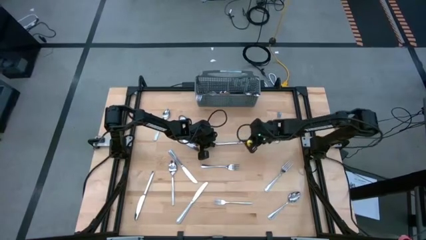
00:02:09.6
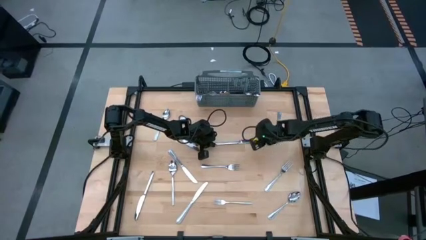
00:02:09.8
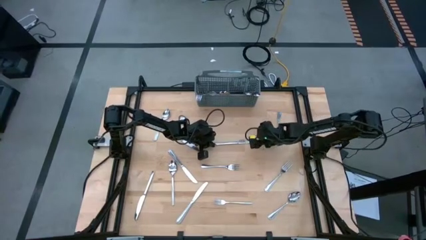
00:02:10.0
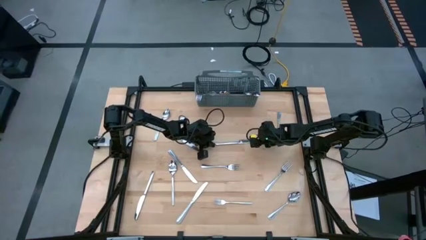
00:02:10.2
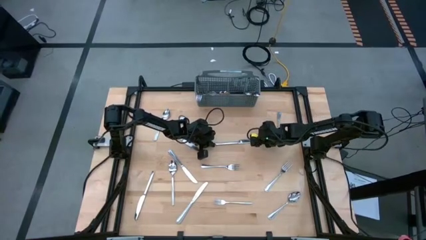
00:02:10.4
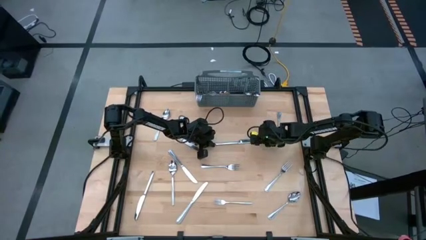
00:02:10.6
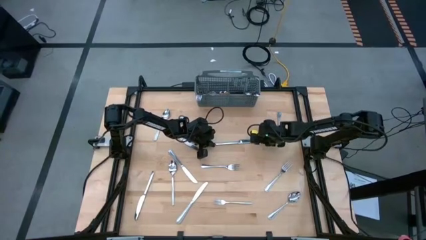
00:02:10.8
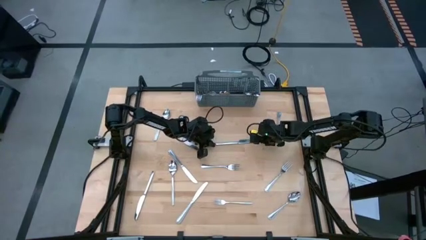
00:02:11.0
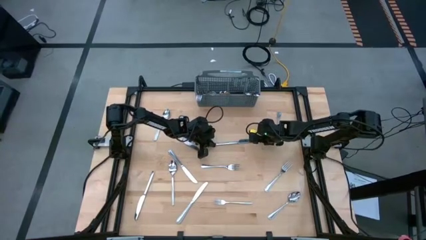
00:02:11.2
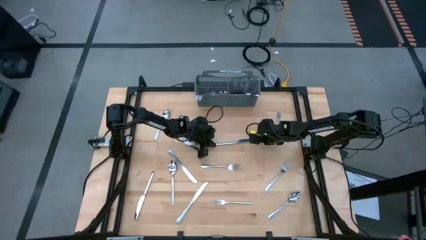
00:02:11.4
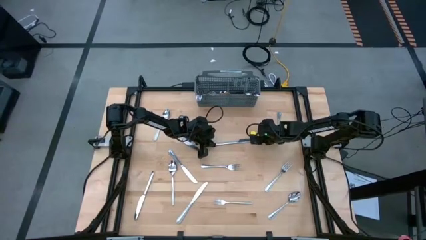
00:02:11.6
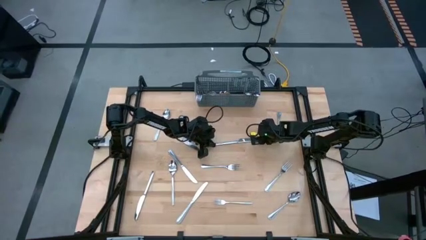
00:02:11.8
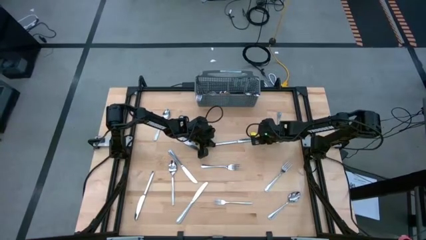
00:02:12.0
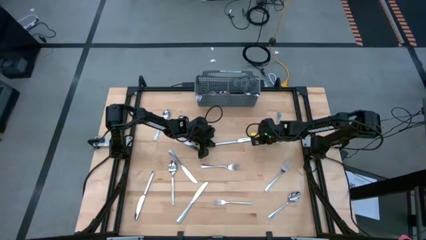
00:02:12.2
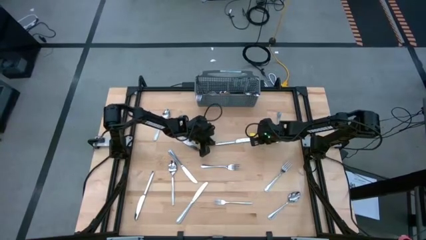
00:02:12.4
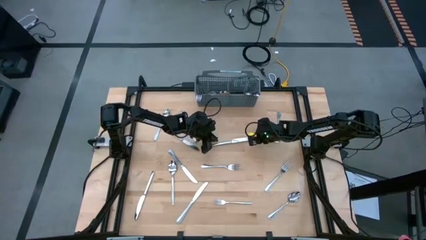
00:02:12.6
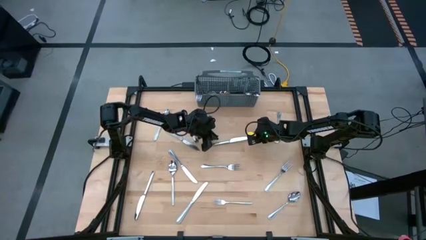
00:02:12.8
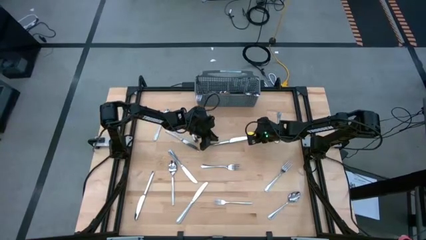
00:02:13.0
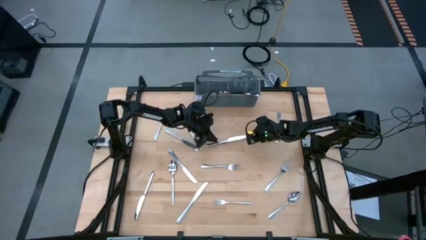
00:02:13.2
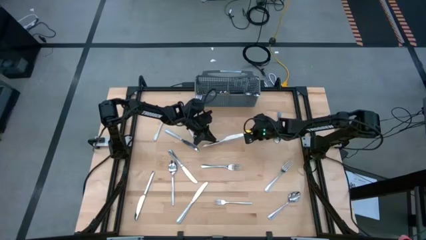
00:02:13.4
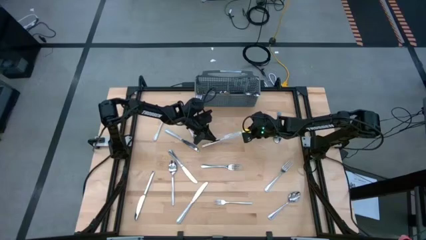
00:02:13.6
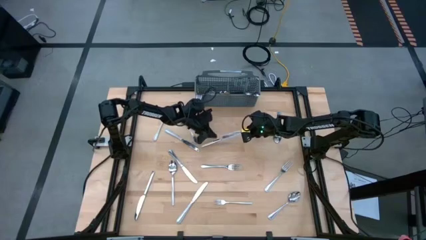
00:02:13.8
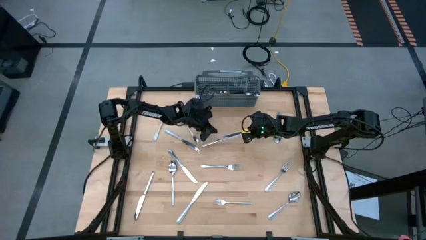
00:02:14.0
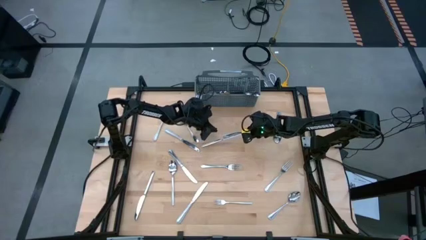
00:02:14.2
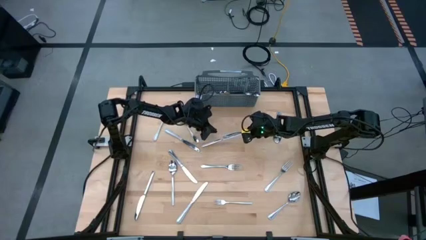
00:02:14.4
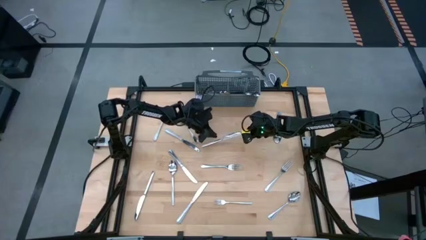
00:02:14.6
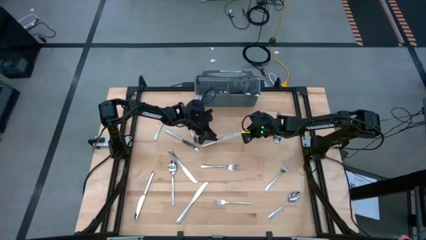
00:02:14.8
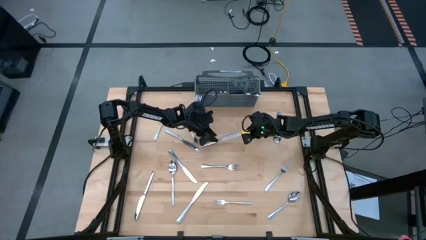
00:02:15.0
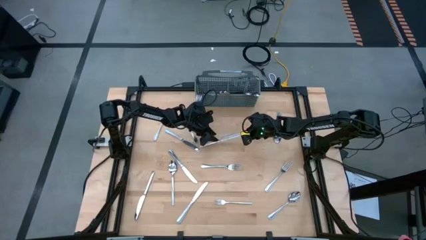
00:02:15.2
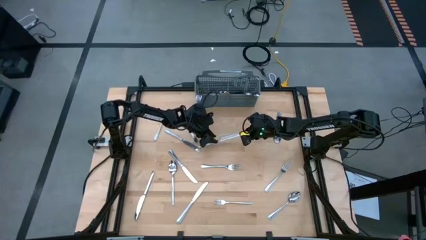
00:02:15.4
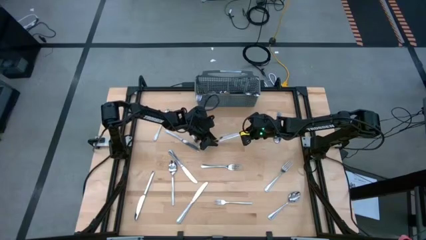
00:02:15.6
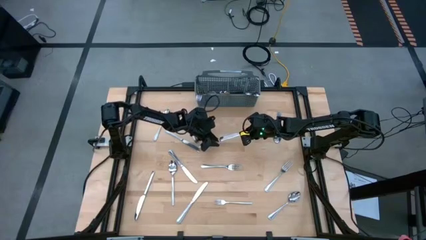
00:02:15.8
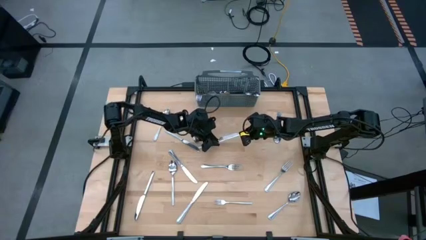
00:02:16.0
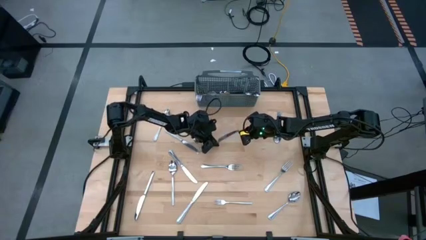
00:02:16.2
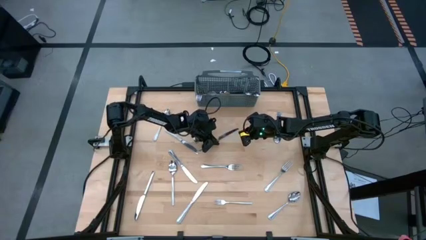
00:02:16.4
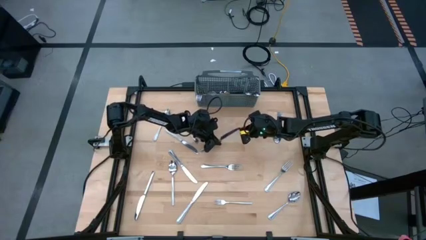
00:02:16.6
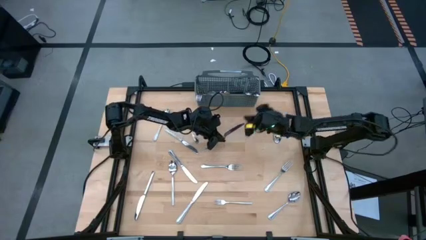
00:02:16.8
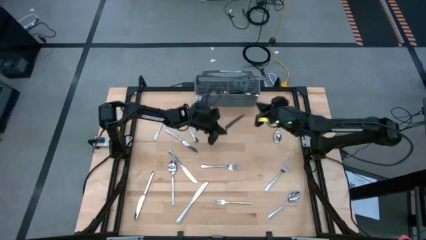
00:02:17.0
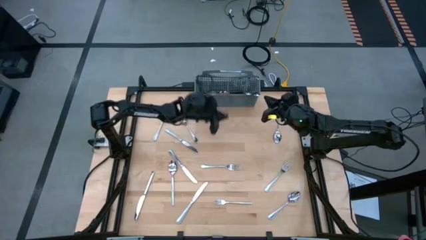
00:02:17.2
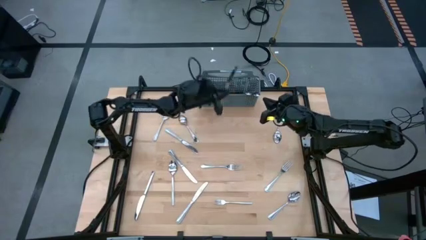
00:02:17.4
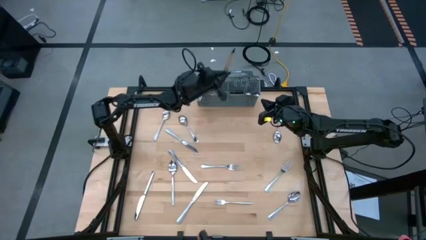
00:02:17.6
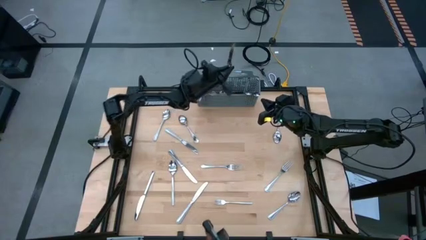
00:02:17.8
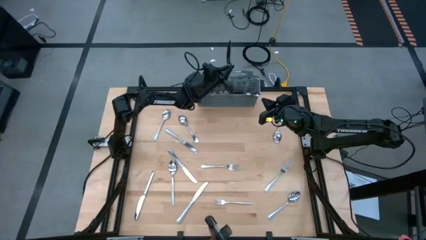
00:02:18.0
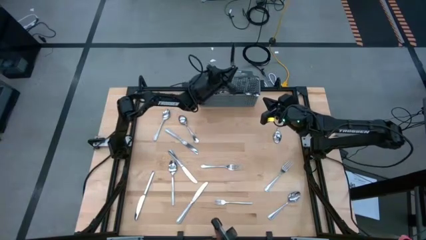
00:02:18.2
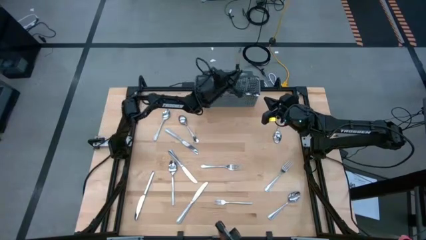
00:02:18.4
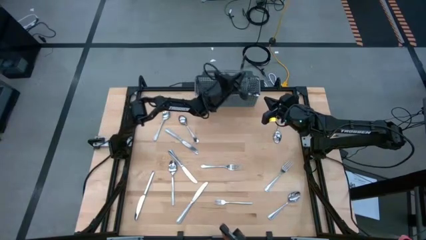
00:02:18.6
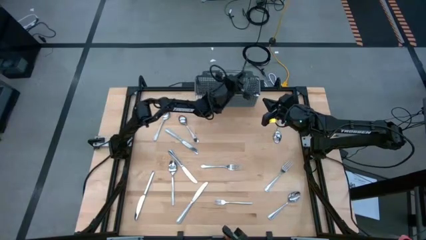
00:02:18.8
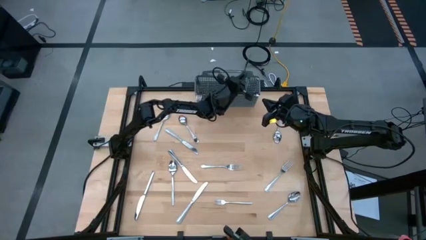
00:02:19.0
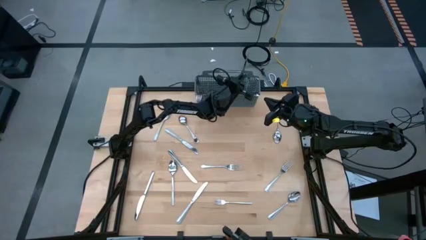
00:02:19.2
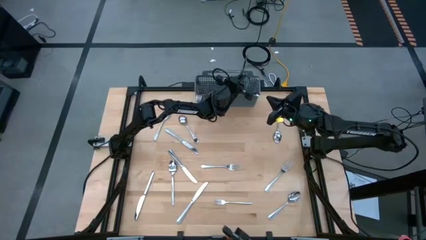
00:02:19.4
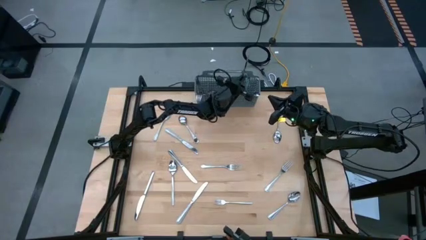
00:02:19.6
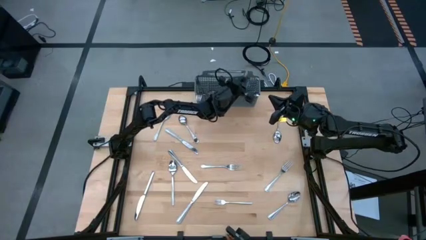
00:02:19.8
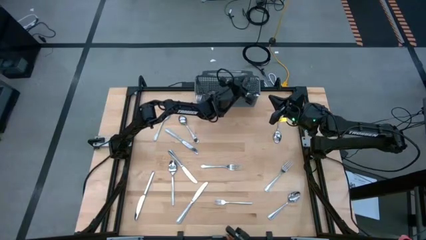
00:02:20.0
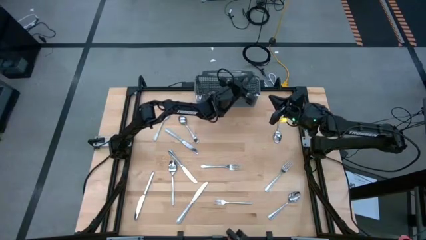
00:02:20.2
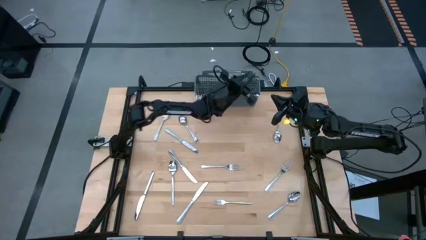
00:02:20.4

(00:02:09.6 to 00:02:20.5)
Task: Sort silverware
Put the silver table knife into the silverware organizer

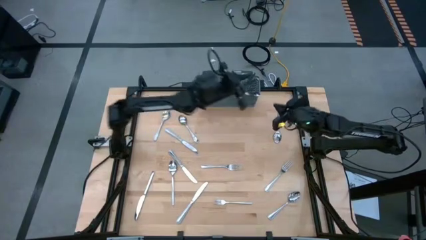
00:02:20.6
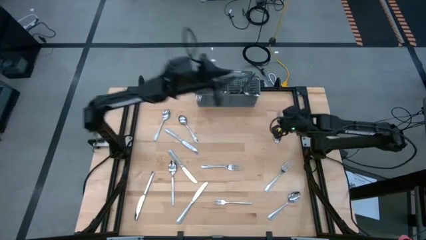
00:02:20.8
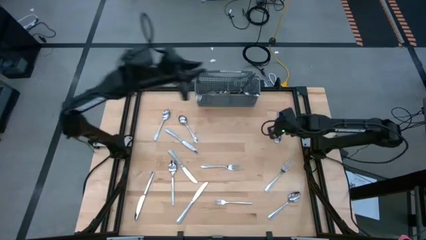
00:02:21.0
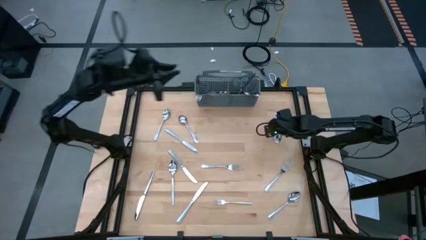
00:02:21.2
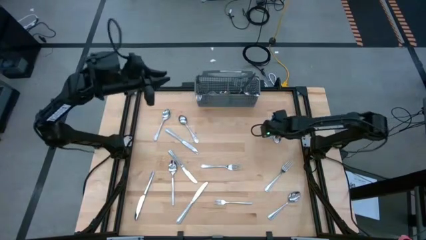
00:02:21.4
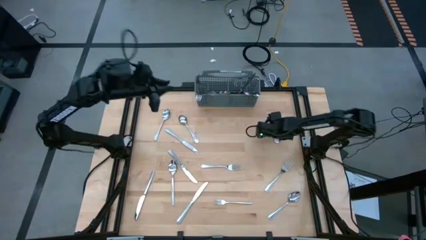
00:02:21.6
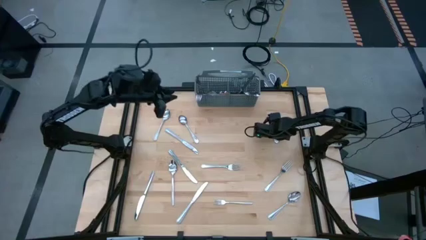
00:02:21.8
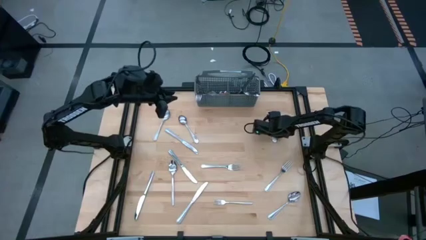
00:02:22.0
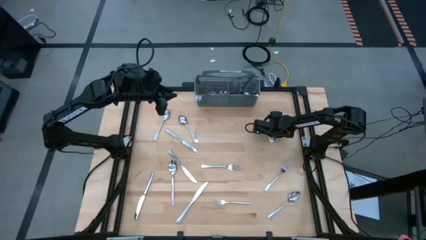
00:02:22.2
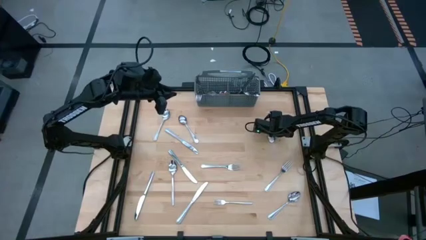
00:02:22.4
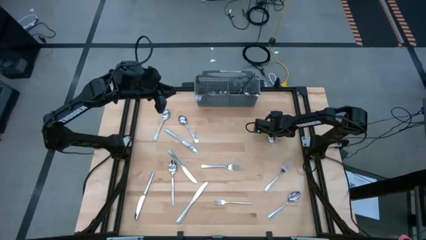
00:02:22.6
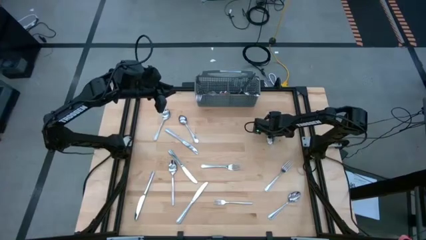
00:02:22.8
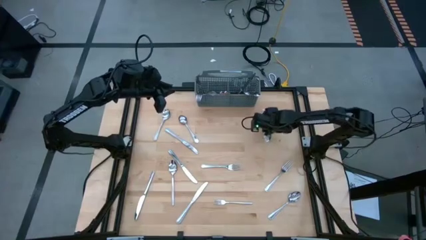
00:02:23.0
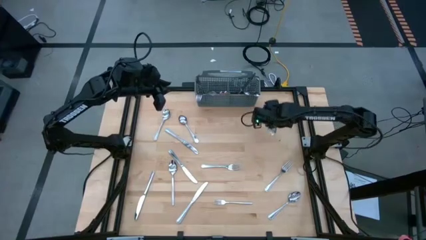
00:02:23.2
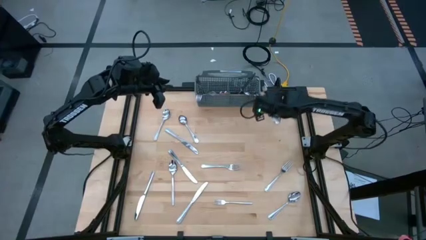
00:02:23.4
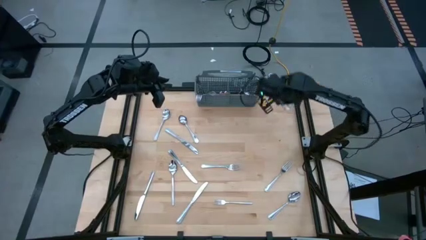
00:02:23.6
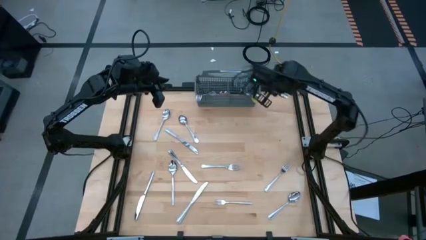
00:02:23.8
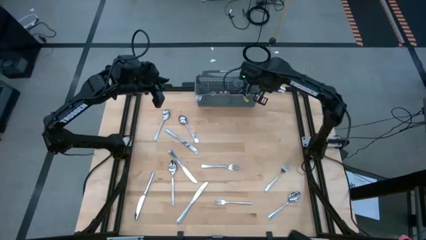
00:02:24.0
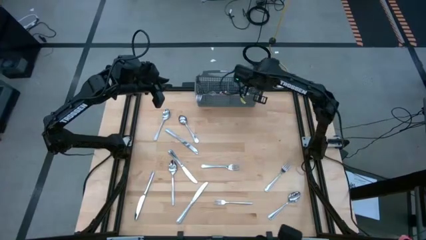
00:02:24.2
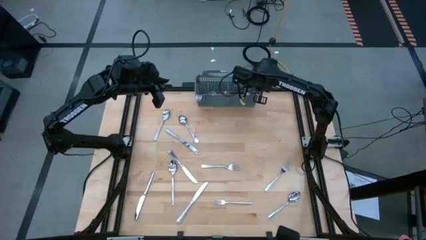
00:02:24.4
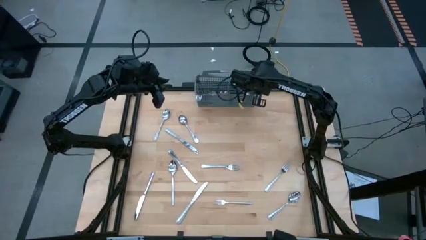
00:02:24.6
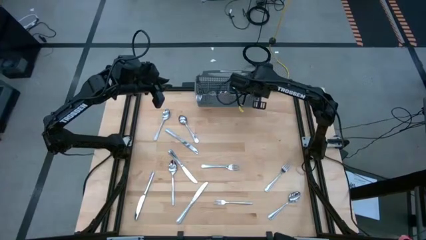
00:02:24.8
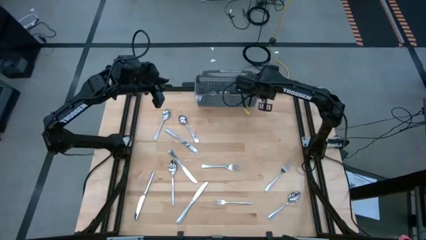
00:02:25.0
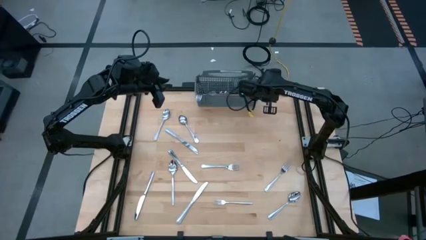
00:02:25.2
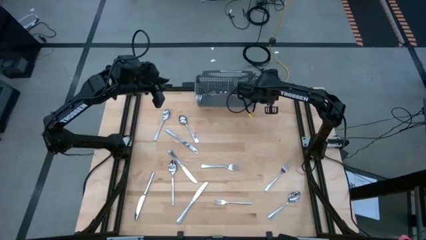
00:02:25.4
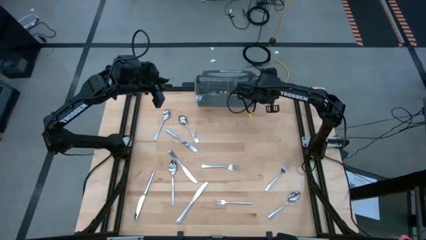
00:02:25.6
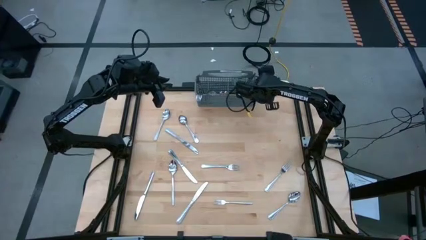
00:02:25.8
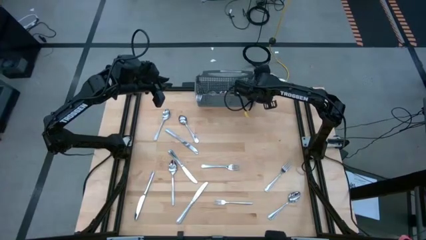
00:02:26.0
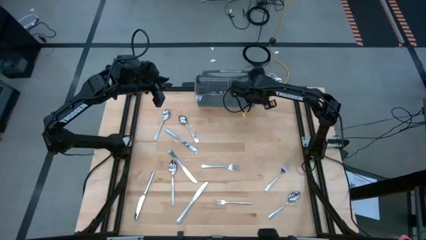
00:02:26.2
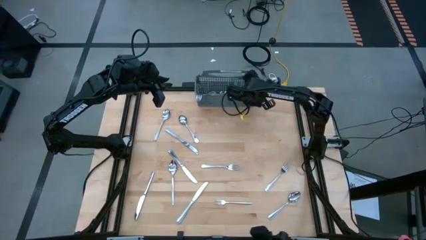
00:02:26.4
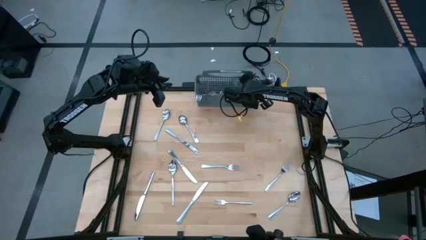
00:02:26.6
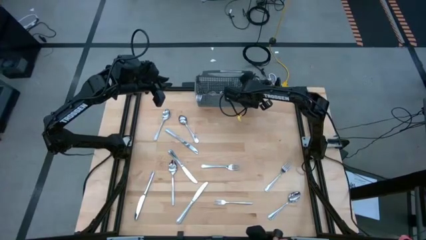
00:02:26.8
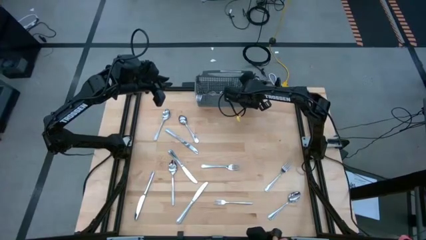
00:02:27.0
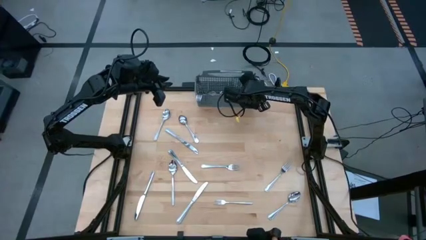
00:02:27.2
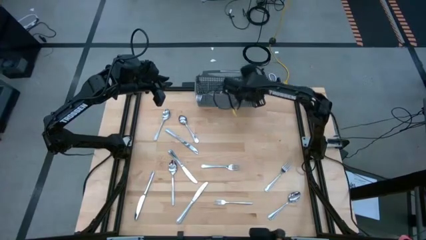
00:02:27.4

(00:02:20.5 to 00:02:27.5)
Put the silver spoon into the silverware organizer
